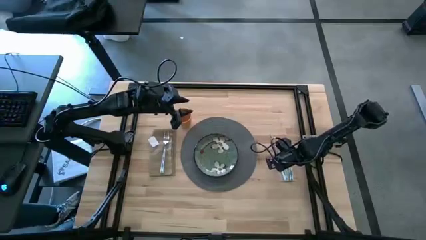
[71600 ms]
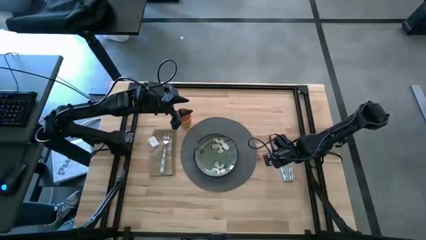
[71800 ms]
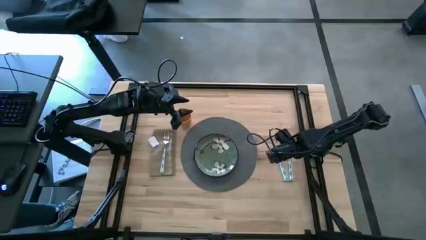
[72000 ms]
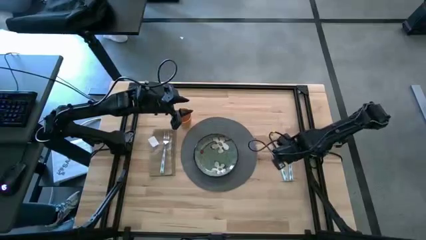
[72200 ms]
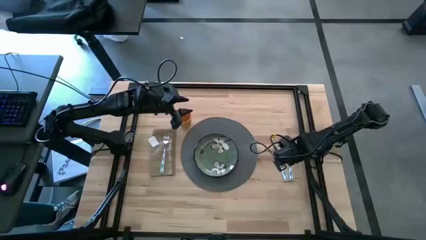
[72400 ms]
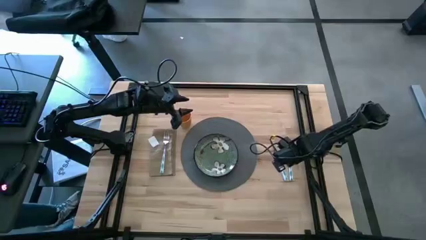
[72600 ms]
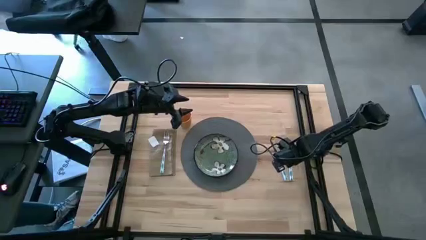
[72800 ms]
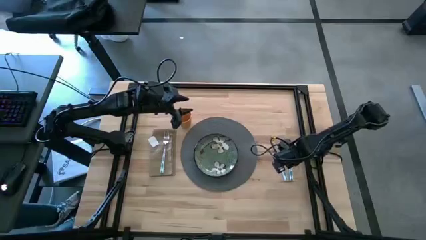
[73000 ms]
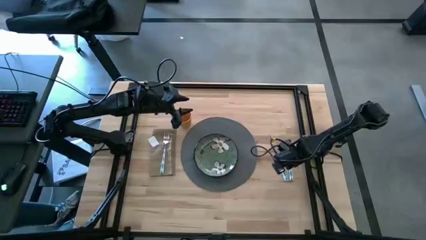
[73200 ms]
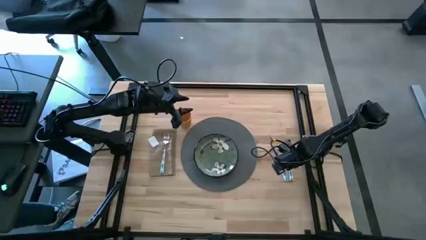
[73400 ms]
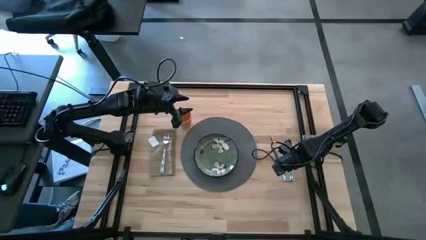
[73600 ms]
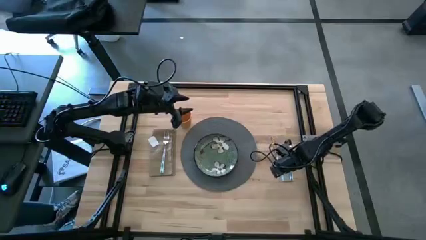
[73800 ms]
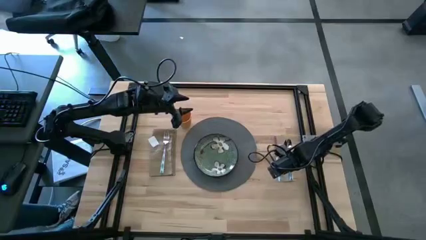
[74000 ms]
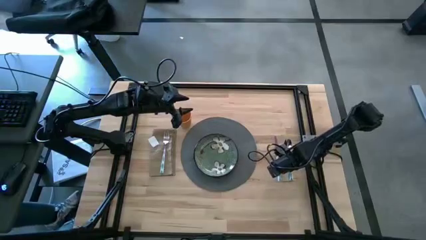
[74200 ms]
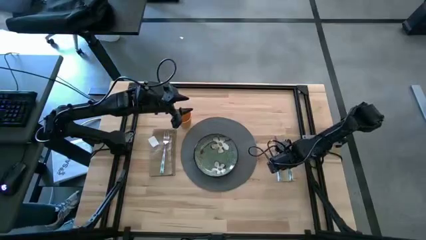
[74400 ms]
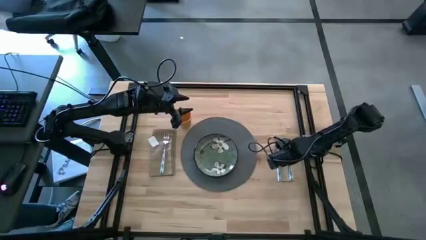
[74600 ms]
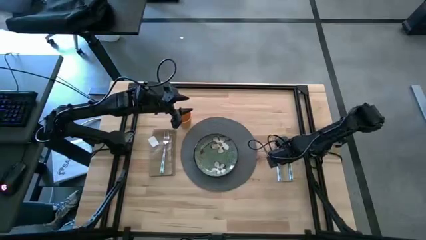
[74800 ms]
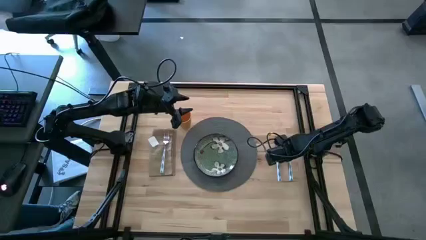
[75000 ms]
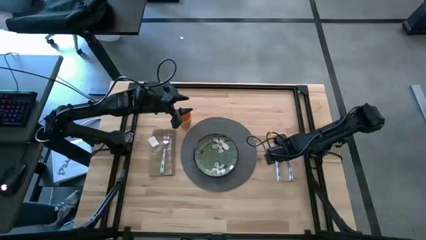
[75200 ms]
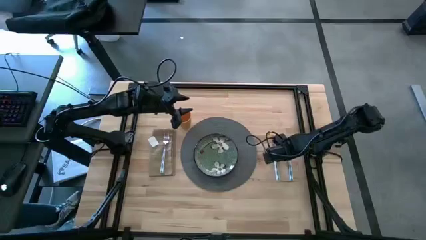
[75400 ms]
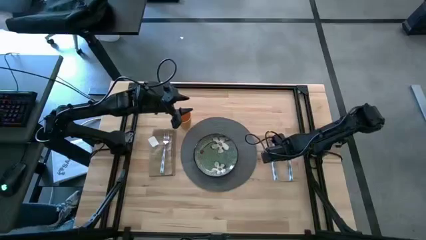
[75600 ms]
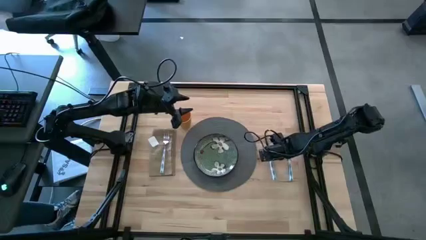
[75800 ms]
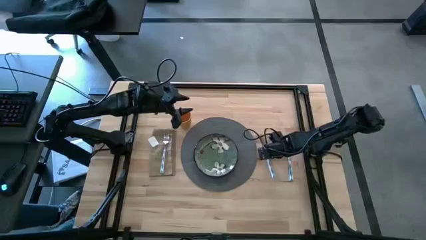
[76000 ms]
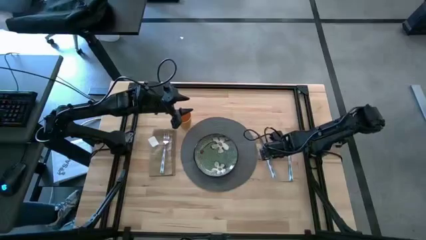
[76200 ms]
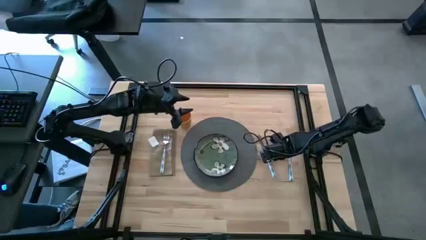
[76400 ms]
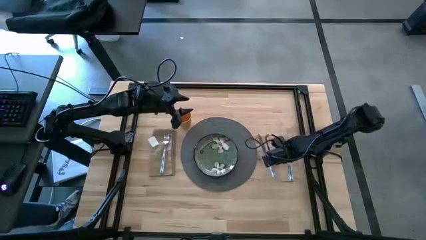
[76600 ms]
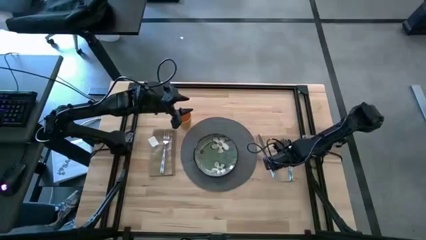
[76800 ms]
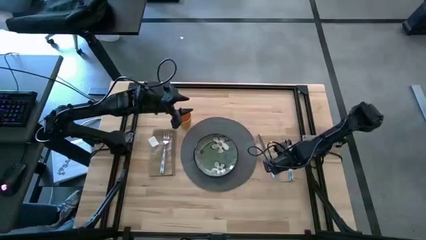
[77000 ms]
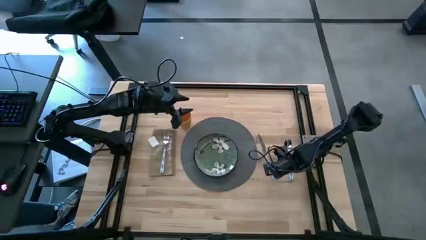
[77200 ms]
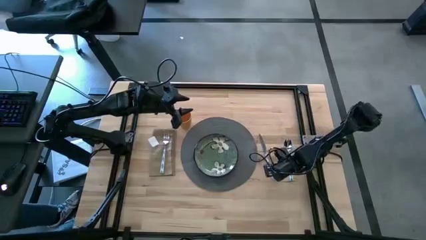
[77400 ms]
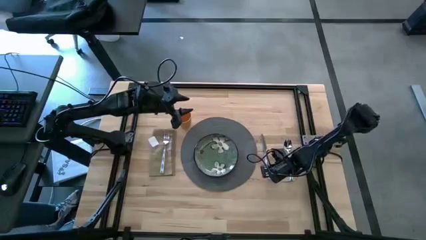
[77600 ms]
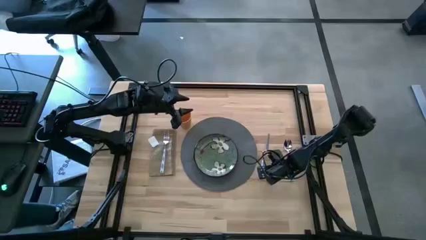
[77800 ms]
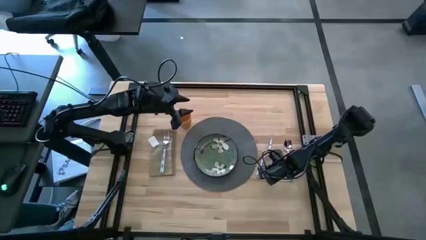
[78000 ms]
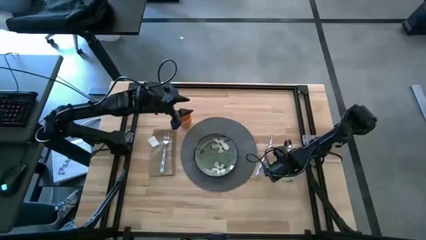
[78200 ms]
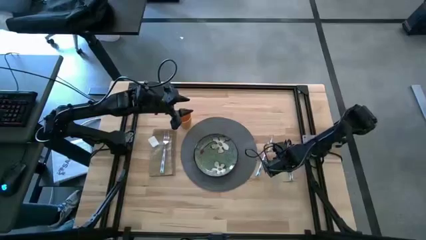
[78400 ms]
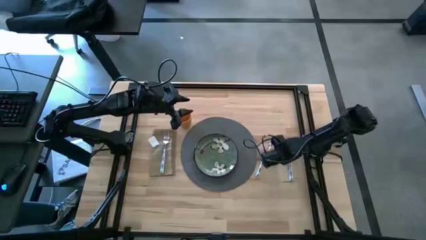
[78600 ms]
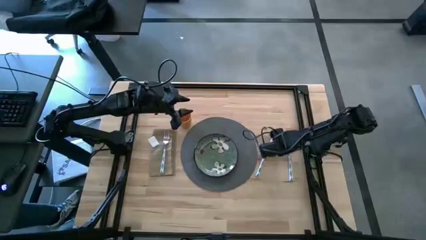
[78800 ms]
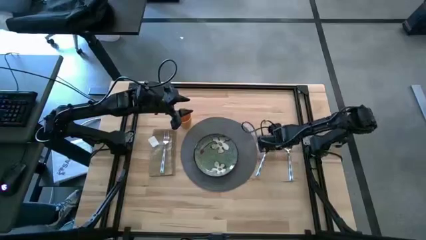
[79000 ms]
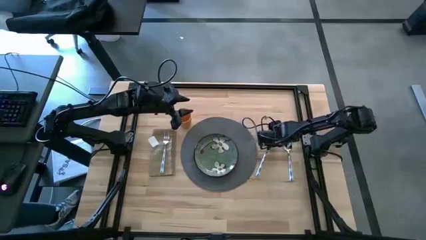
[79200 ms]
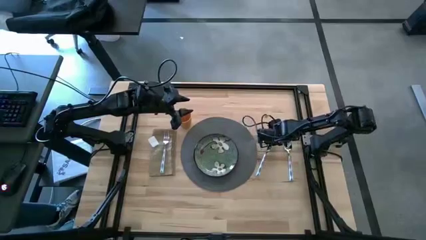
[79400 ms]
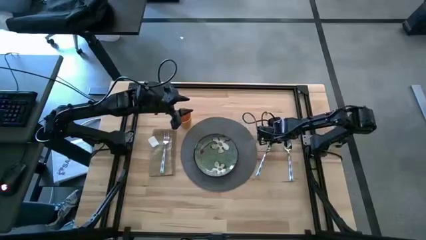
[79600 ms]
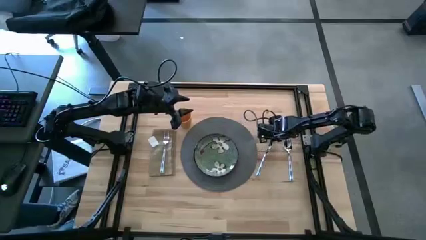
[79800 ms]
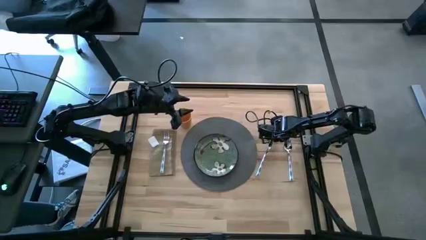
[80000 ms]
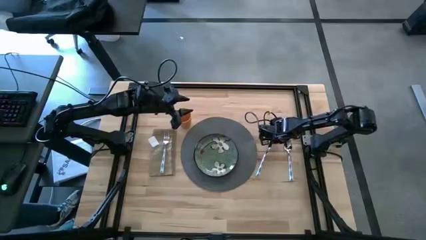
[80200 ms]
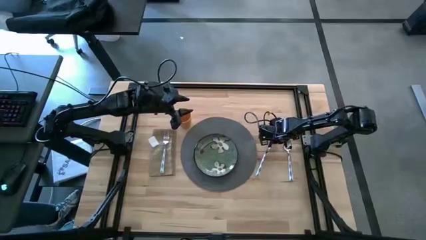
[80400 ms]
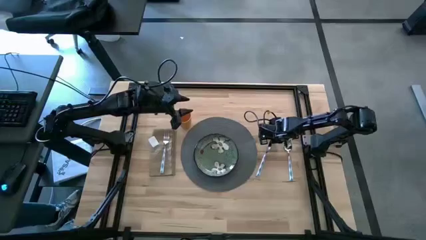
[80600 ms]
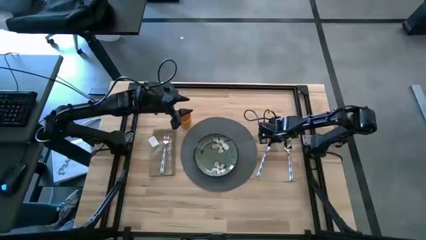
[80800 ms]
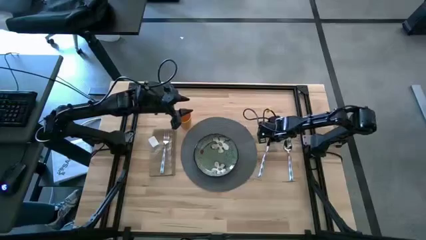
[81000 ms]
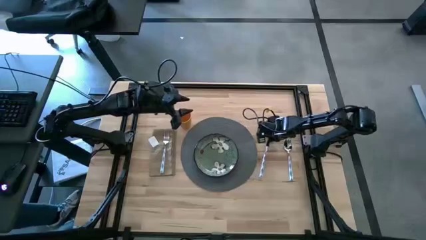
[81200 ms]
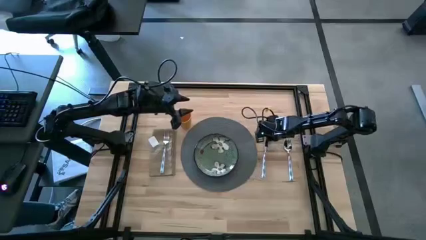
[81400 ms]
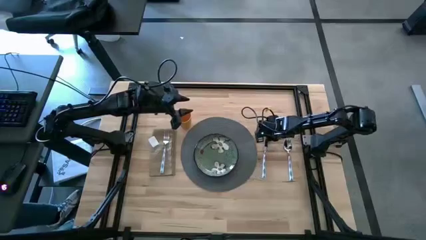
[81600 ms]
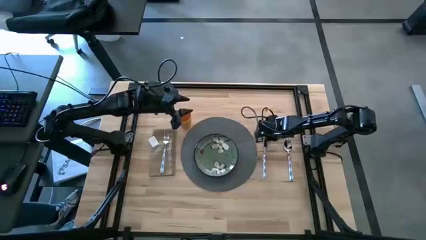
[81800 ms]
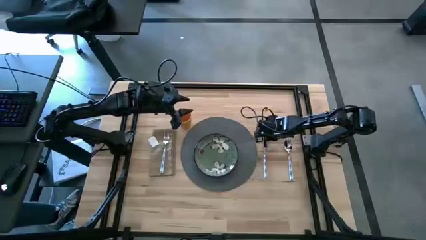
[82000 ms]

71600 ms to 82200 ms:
Task: Set table place
Move the white patterned table knife to the right of the gray table mat

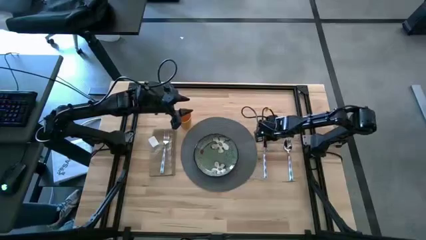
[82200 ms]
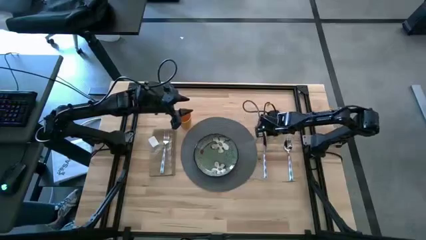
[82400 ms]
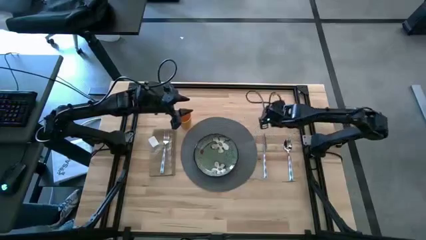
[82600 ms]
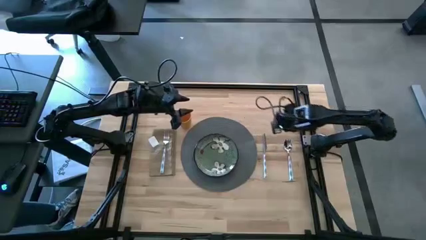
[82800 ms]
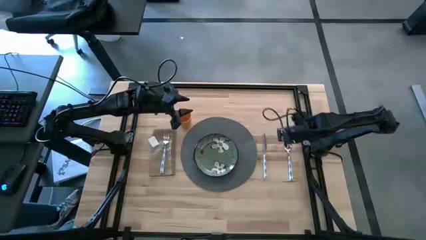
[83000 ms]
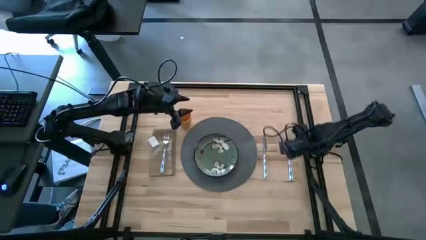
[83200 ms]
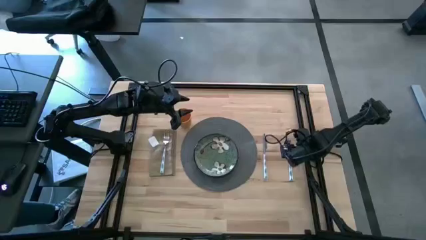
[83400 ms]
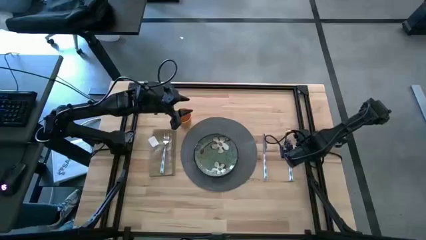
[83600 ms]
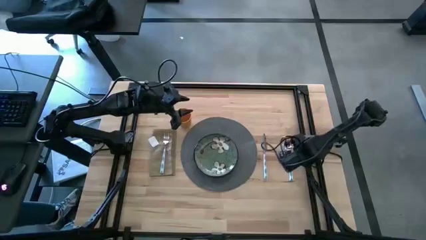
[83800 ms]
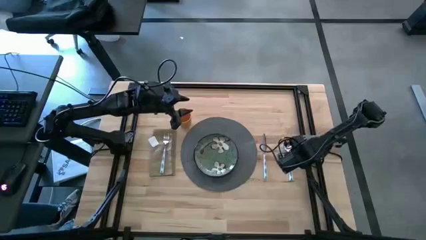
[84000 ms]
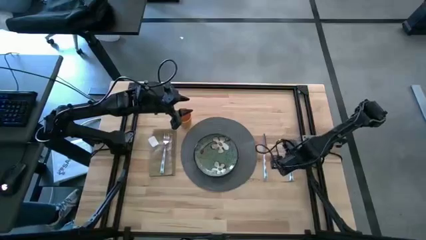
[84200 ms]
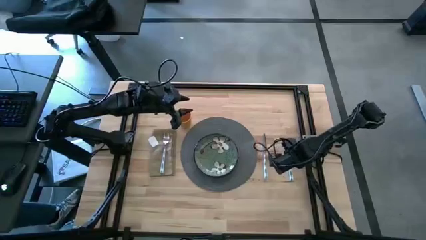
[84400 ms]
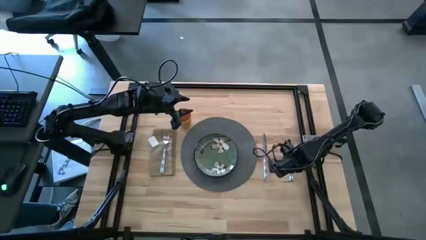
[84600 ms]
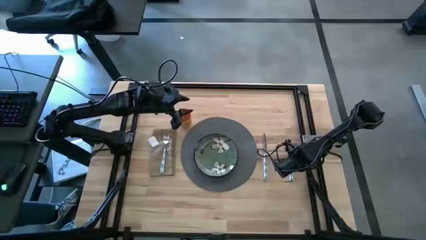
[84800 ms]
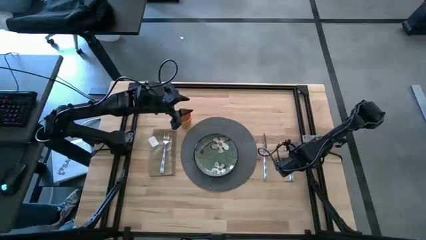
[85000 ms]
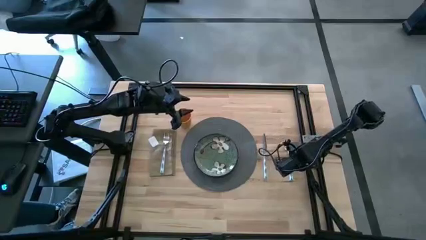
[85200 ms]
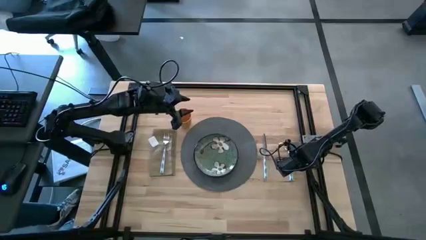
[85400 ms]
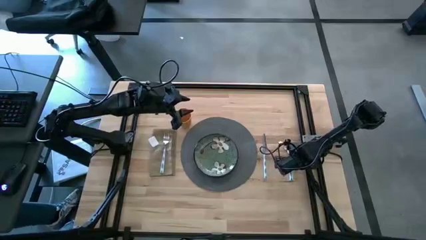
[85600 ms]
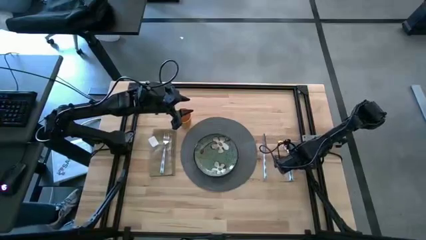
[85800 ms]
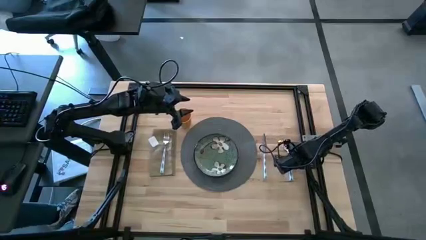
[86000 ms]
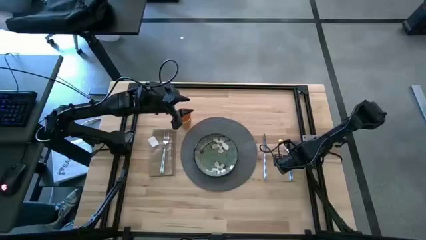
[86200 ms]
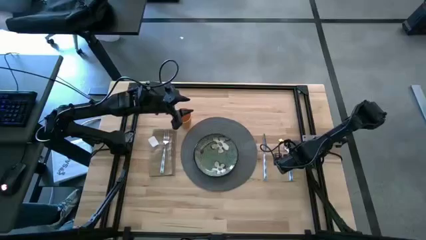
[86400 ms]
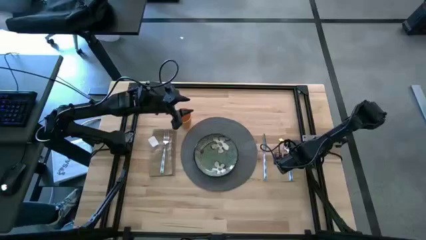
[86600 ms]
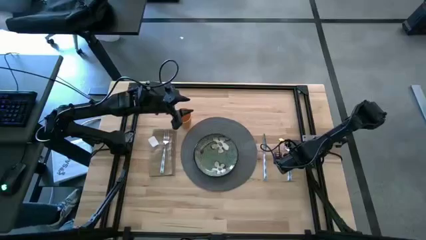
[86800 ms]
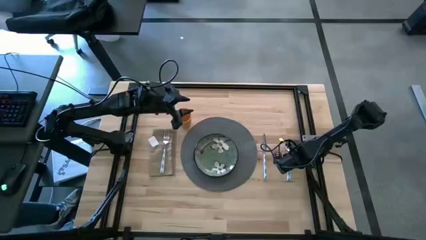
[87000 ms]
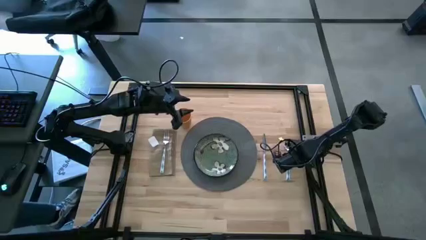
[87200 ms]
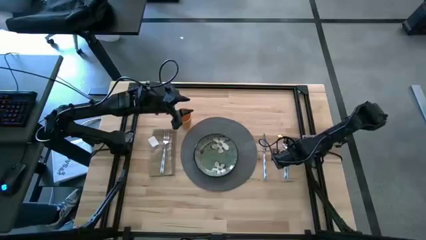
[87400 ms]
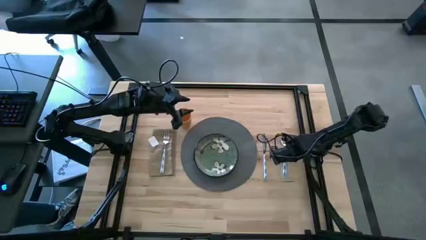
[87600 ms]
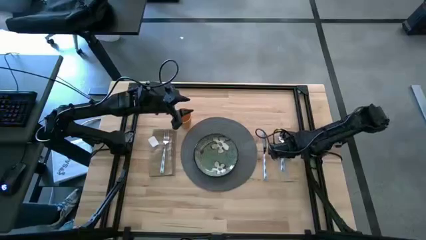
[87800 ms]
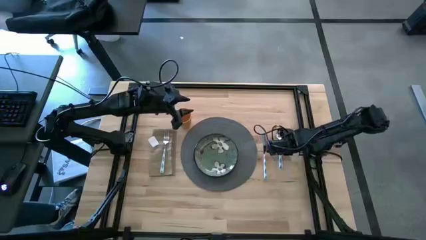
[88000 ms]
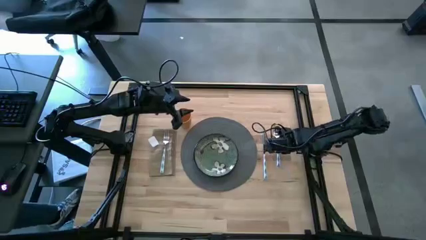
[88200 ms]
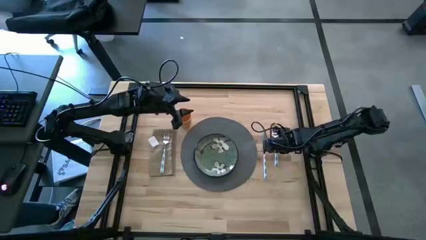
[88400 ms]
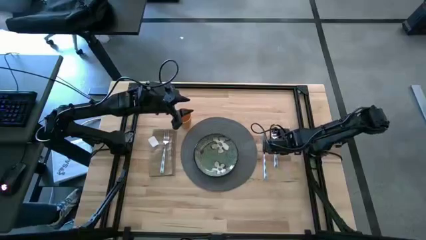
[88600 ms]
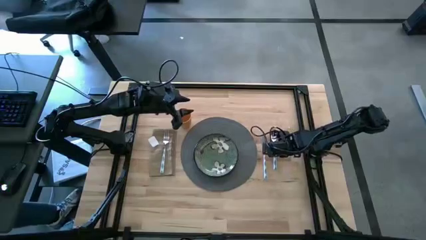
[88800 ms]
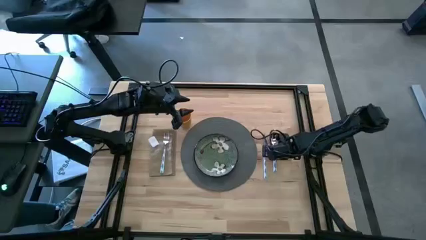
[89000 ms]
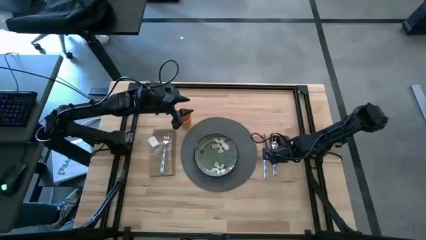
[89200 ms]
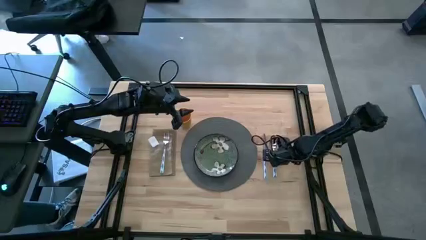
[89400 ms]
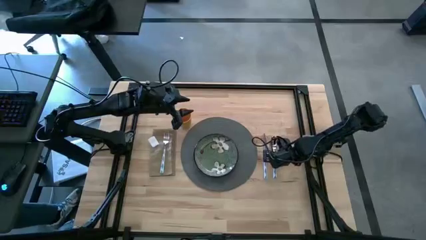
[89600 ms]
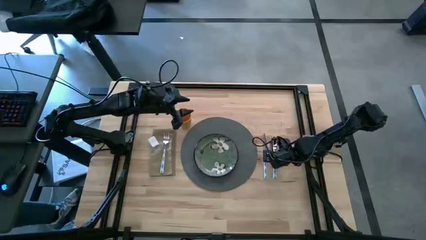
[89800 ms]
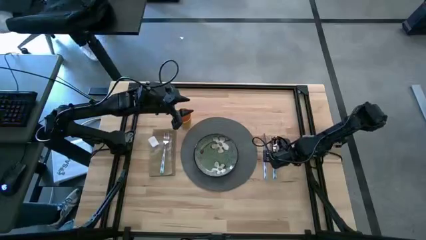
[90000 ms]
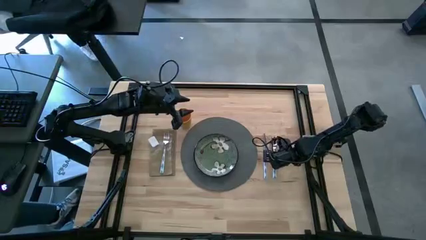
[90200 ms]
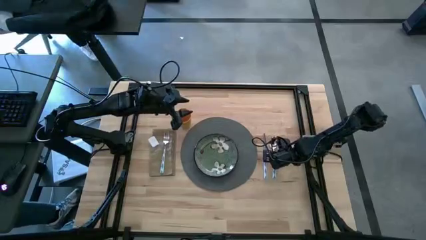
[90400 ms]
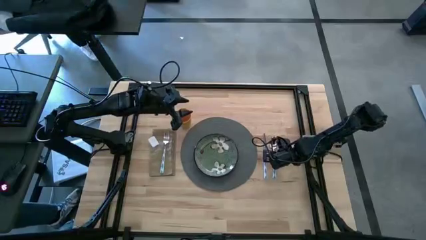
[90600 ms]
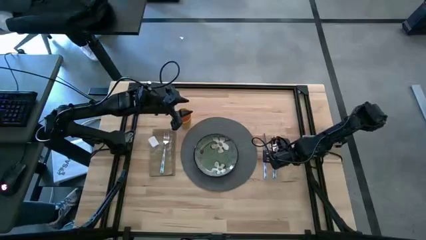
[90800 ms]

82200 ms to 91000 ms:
Move the white patterned spoon to the right of the white patterned knife
